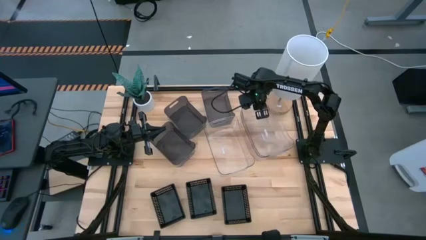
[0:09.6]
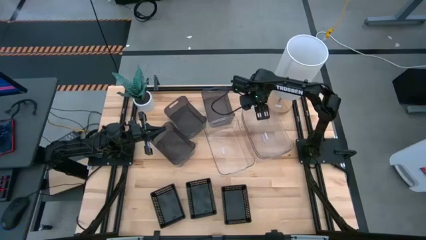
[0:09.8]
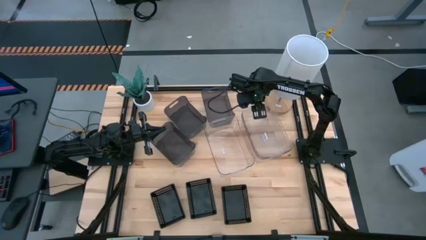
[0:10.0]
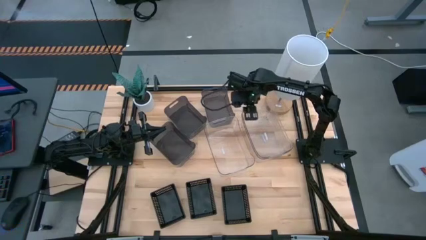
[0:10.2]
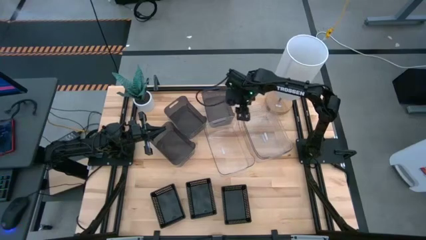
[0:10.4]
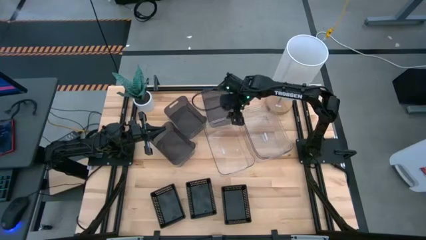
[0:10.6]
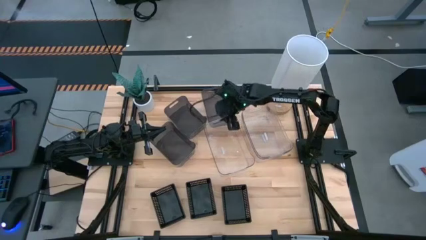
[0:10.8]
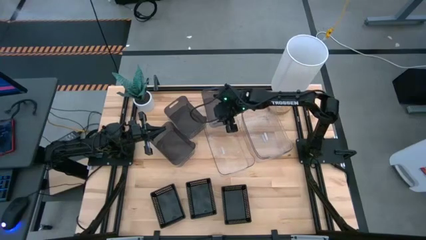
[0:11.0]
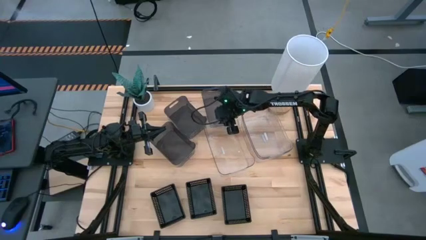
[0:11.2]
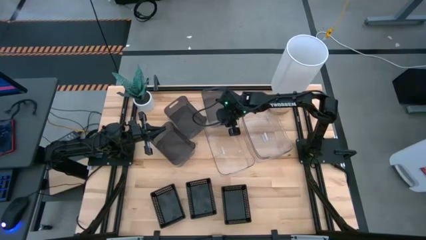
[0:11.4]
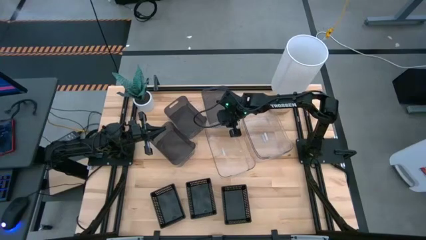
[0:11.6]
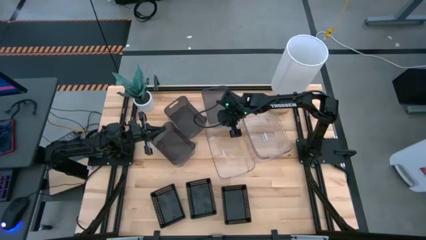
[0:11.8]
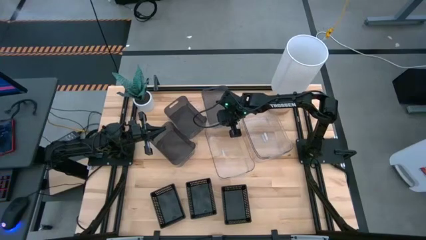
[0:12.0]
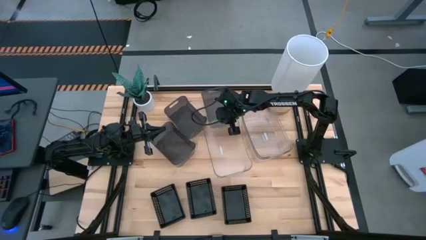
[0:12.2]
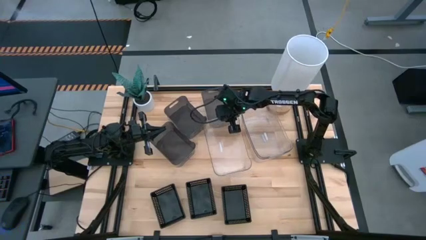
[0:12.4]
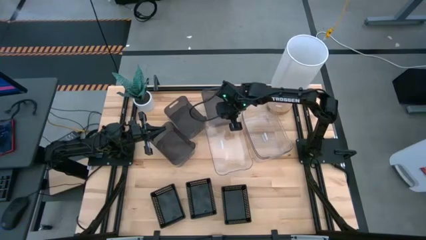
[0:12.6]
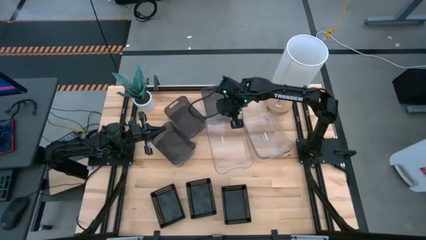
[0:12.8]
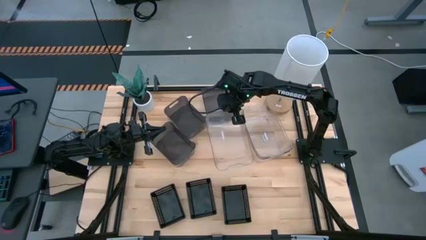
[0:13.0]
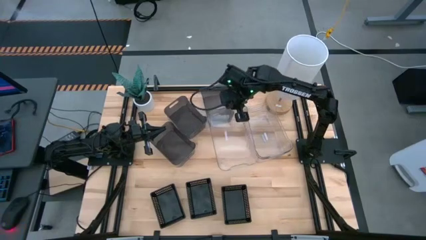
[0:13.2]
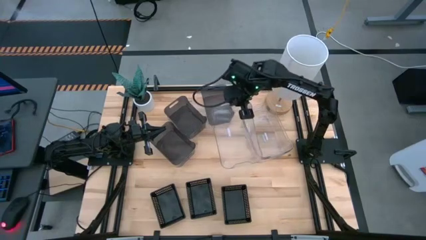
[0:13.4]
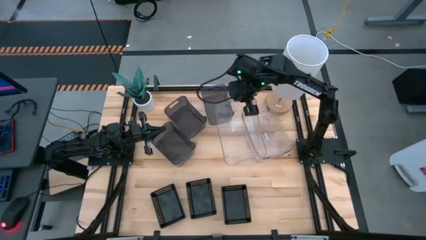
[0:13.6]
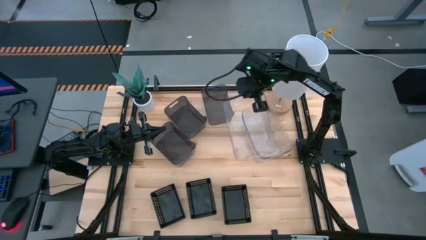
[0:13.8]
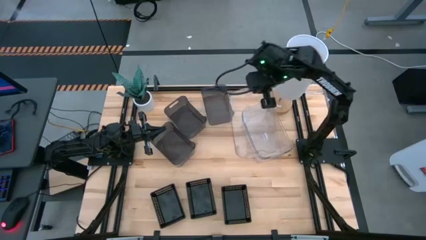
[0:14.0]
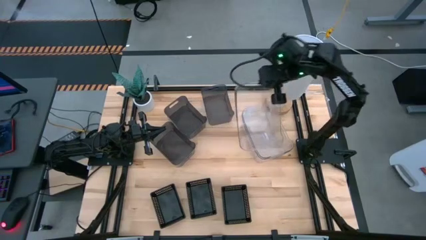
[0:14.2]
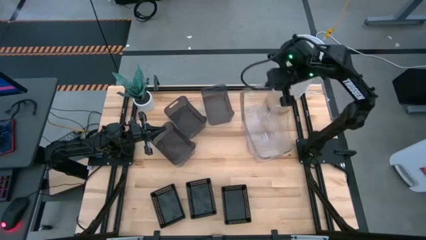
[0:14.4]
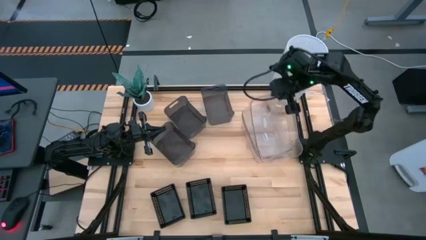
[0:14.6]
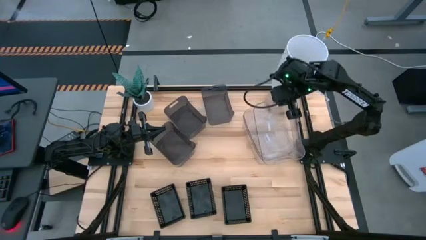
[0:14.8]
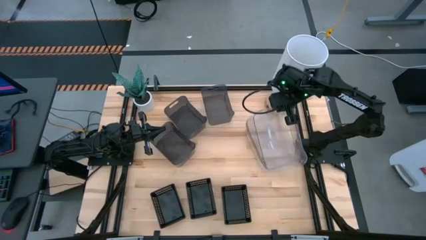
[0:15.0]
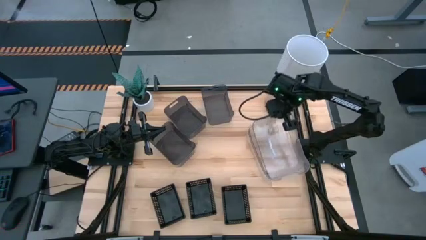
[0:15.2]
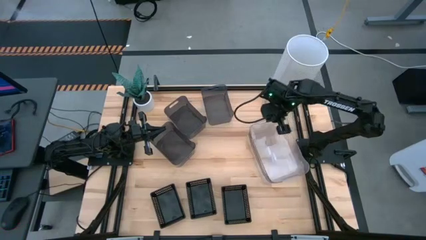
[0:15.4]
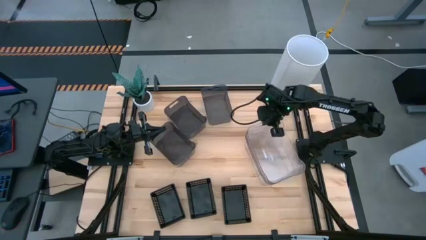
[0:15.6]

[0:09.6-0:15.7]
Stack the left transparent bin on the right transparent bin

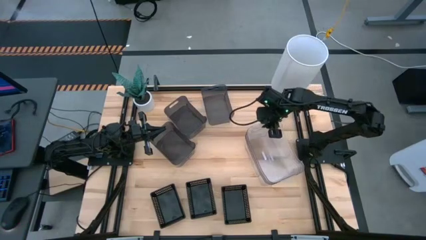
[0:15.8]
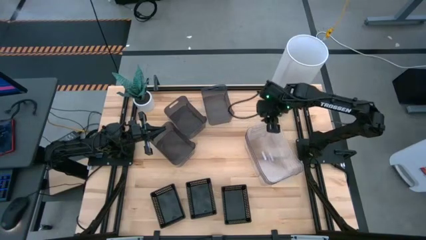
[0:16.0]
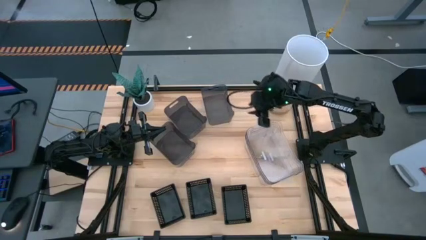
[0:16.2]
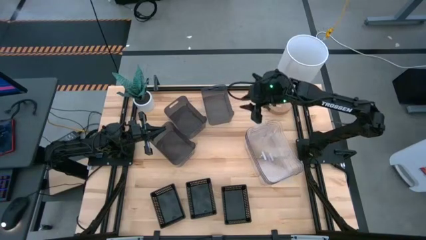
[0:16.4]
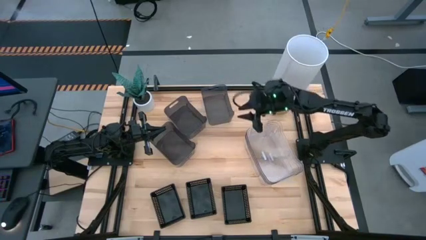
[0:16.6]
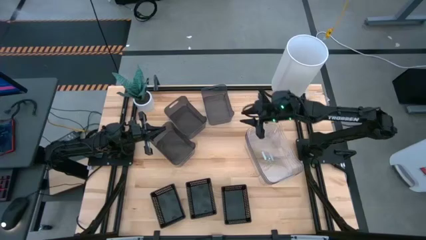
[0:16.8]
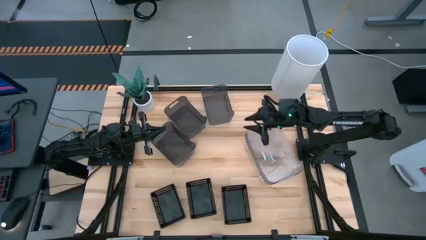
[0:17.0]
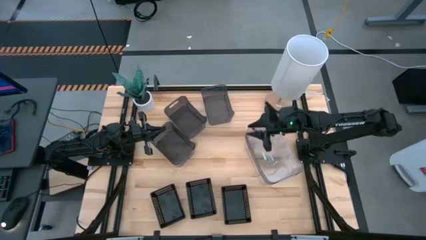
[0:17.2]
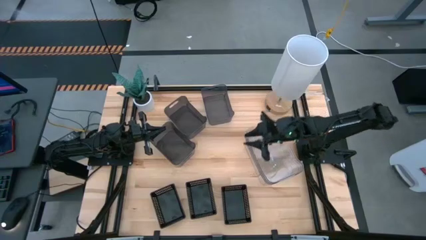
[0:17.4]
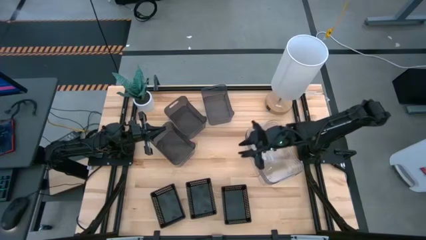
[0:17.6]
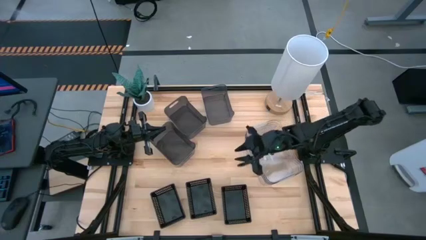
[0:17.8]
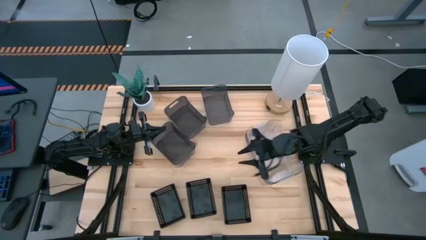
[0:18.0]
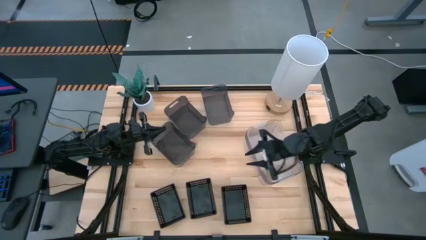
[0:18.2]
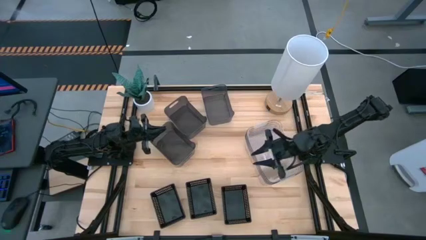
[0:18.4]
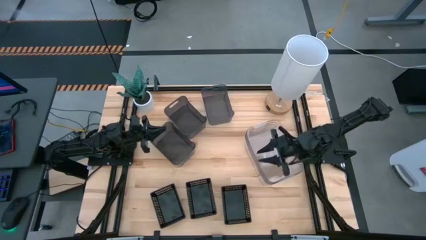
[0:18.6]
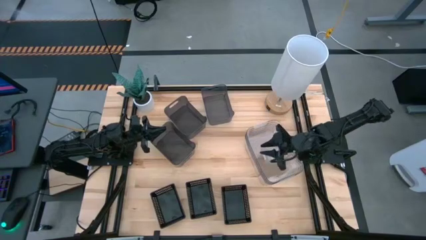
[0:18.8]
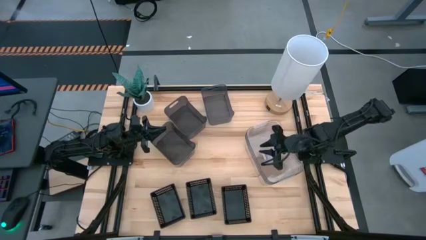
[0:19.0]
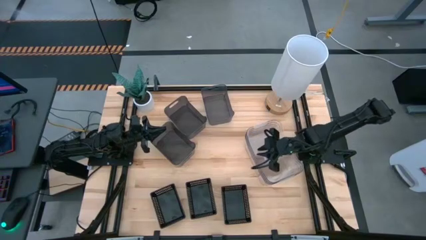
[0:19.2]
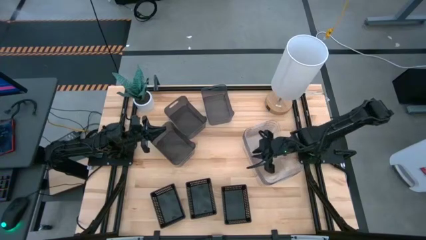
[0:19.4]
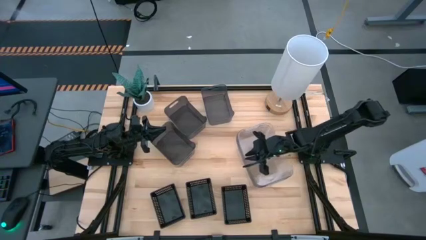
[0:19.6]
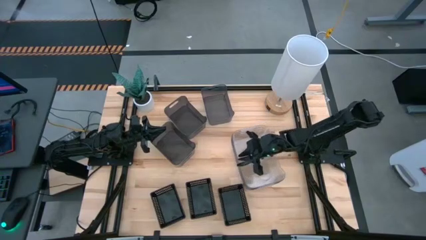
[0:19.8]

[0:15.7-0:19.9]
Adjust the stacked transparent bin

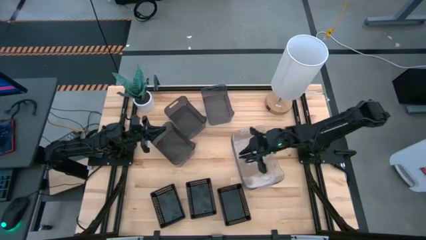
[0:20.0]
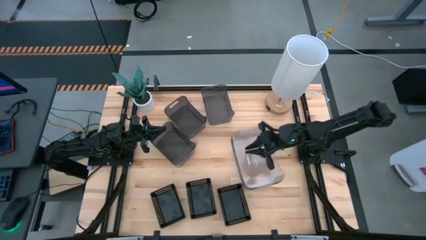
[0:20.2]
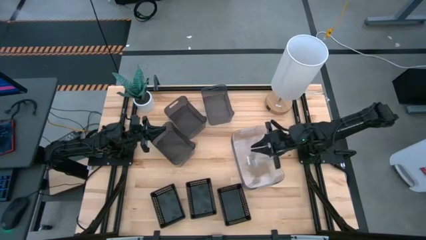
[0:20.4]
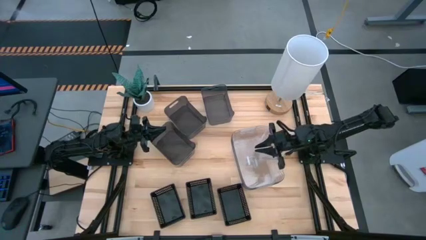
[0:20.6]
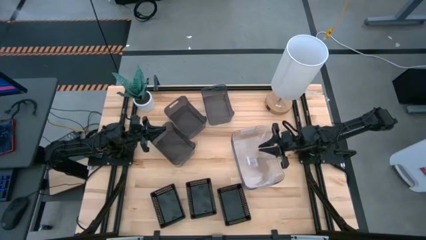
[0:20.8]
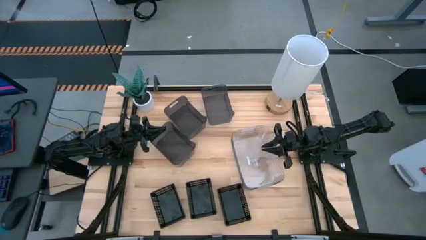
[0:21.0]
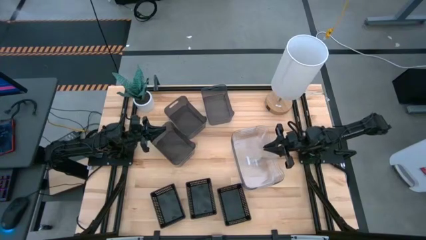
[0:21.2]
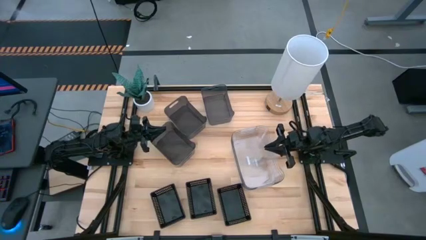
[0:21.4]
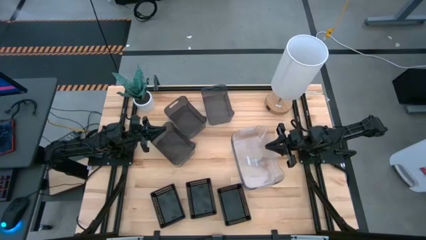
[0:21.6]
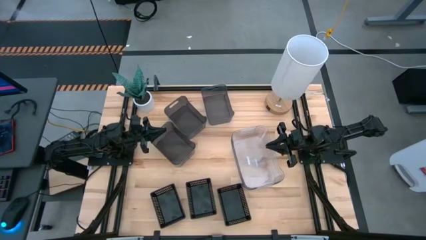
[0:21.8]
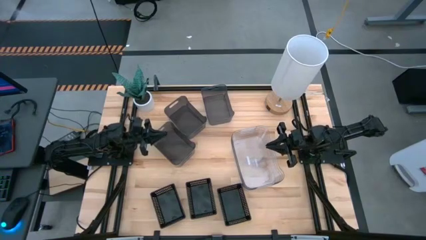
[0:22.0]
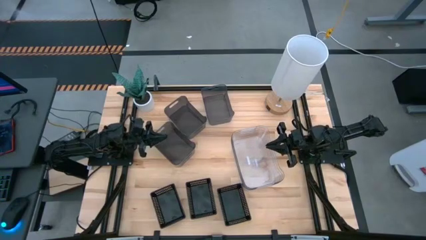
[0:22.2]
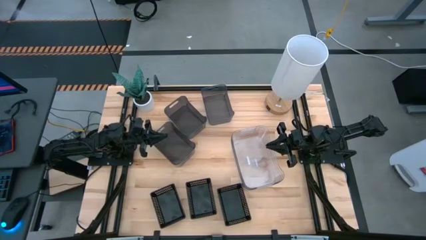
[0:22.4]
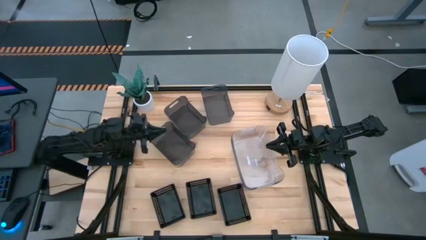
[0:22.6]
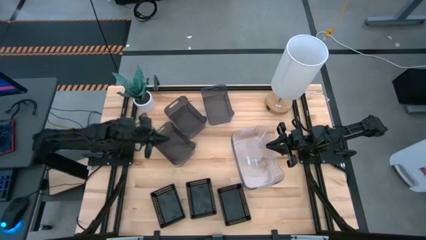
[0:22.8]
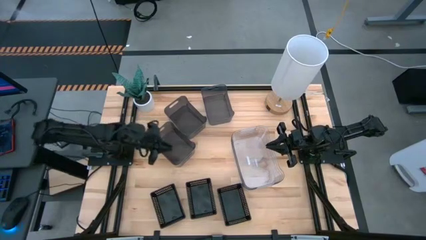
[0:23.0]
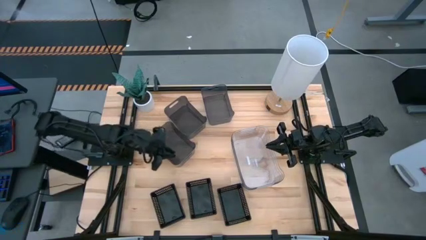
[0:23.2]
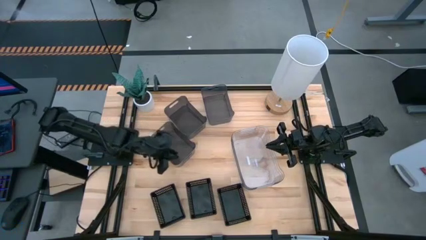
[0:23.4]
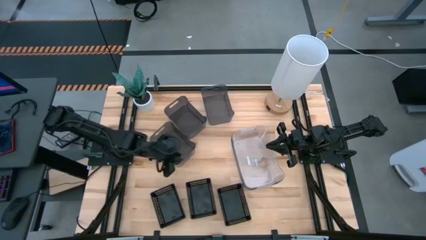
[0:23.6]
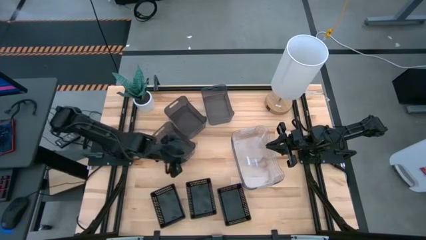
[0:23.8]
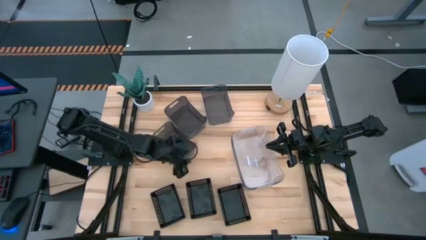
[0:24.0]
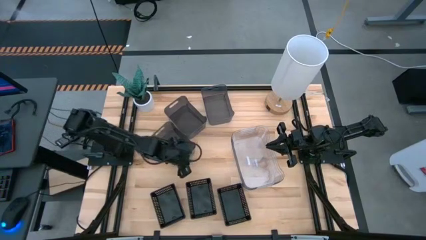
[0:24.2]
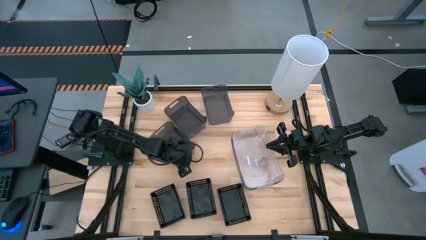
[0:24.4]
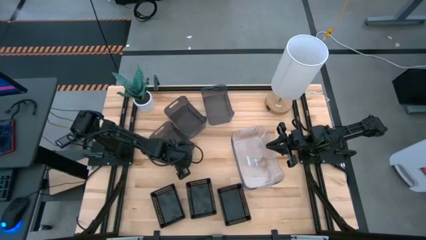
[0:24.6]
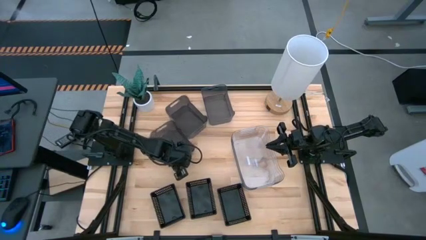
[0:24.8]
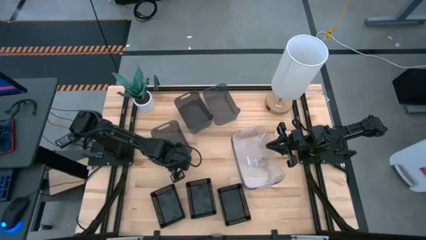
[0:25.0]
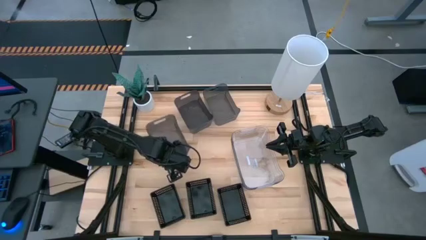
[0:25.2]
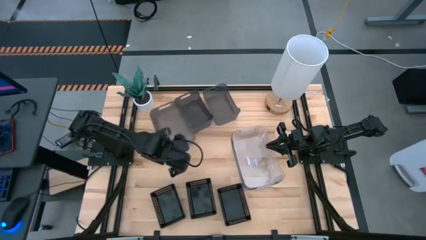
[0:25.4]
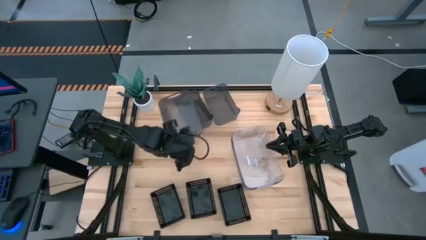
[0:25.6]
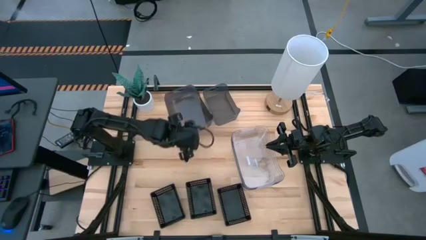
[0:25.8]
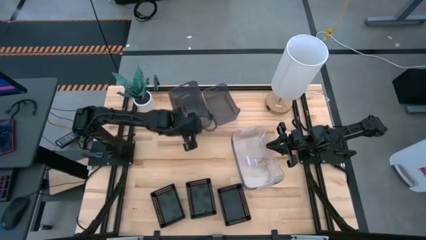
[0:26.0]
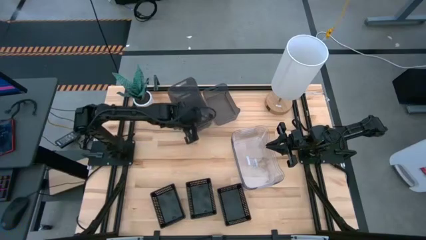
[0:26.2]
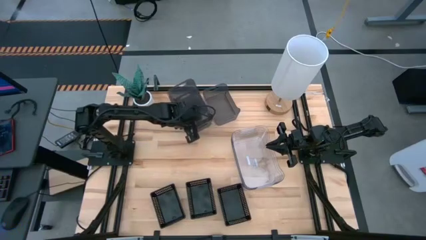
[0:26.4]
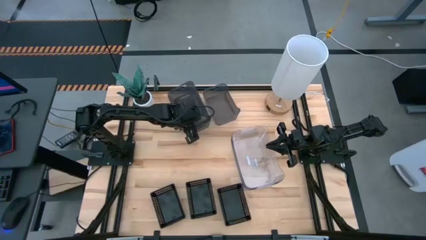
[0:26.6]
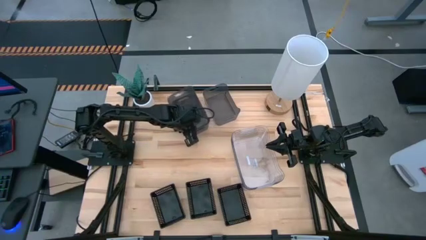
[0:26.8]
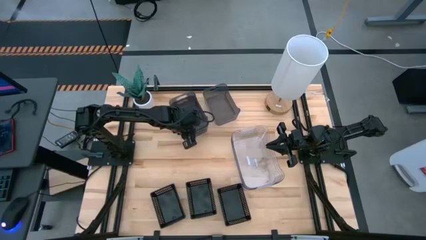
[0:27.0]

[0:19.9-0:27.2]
Stack the left gray bin on the middle gray bin
